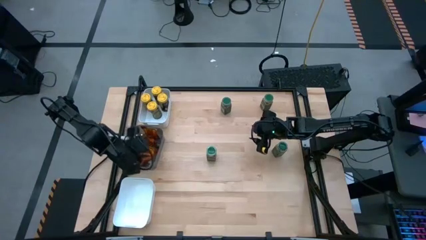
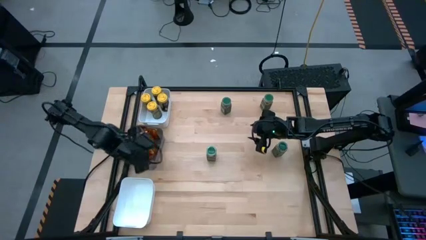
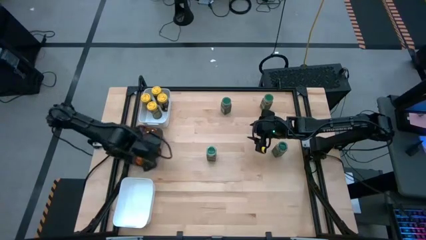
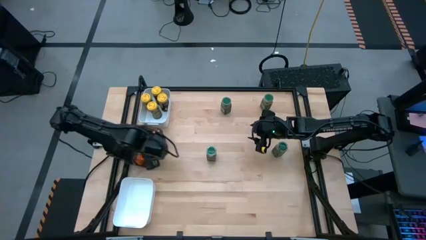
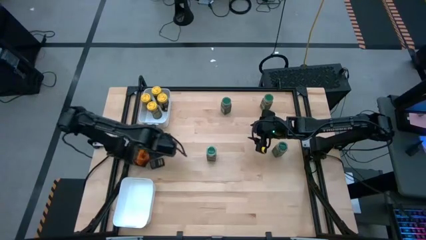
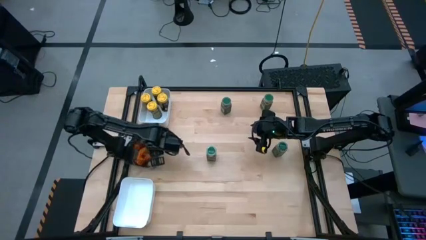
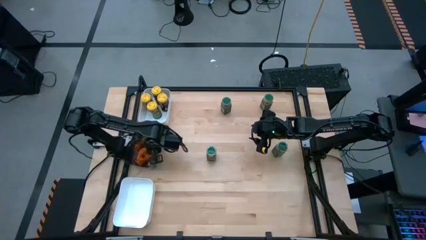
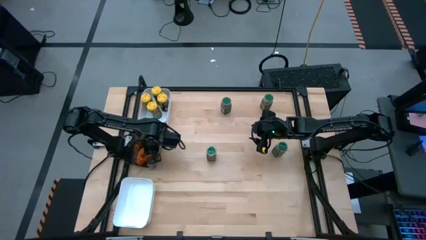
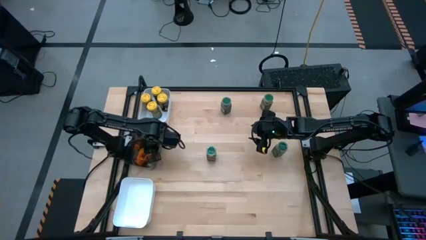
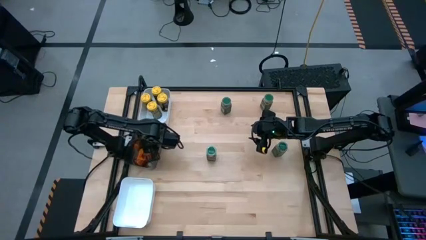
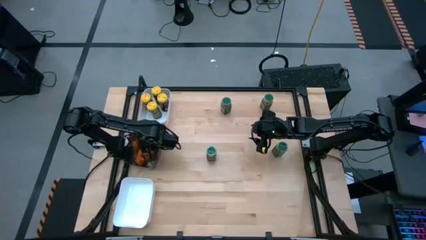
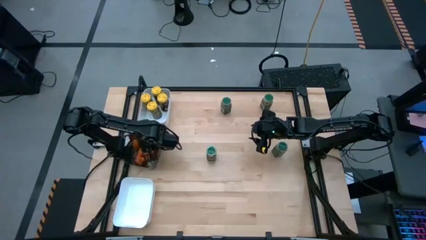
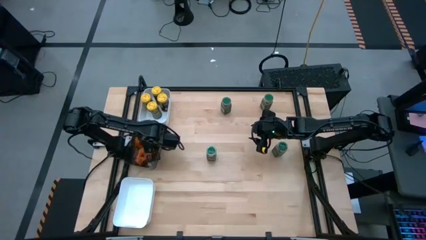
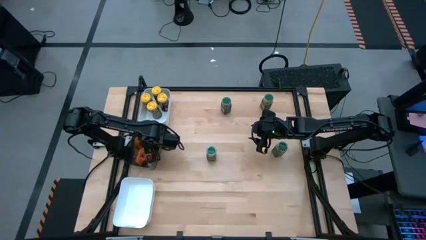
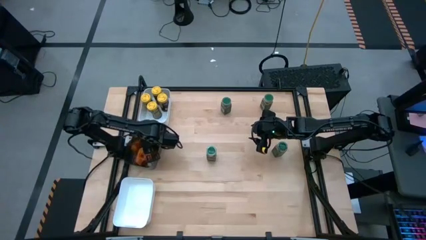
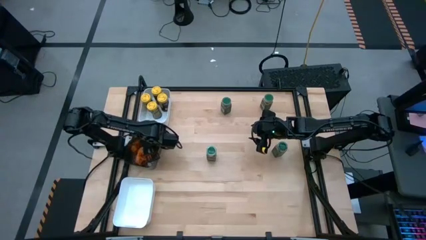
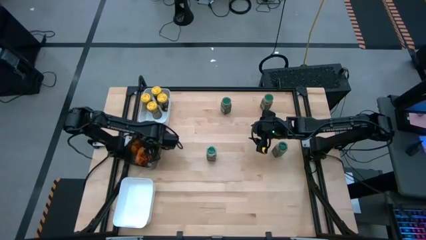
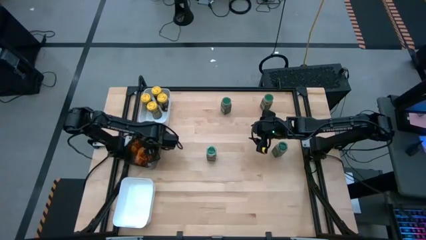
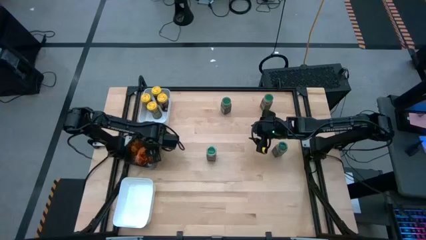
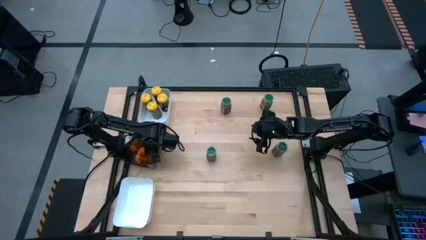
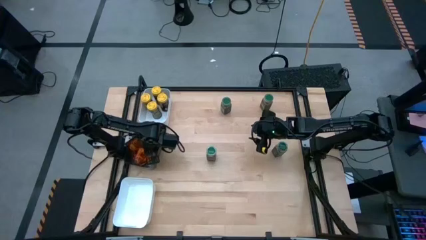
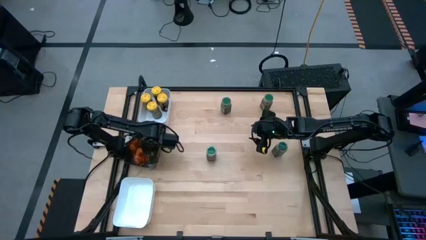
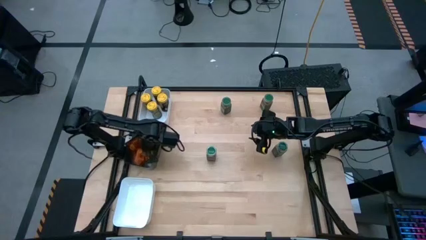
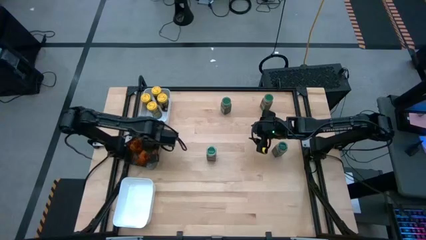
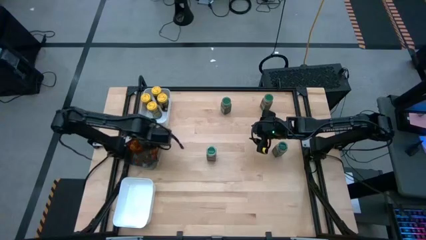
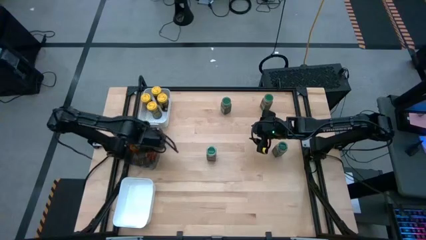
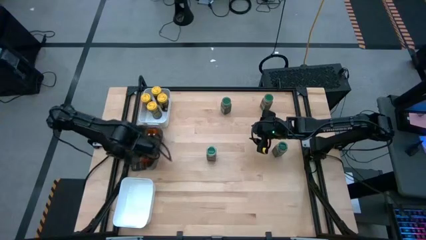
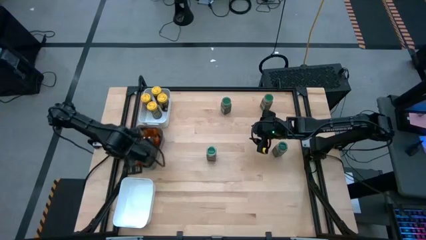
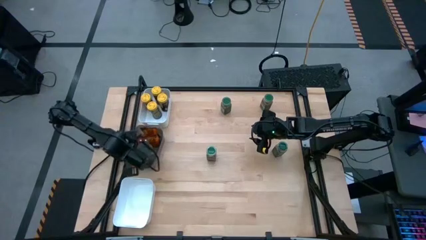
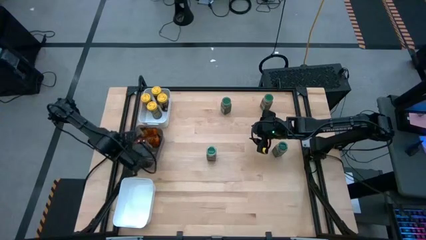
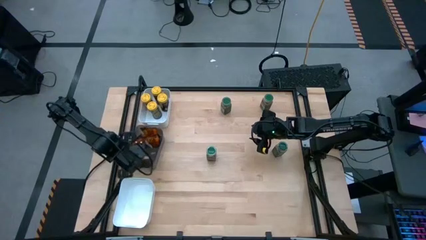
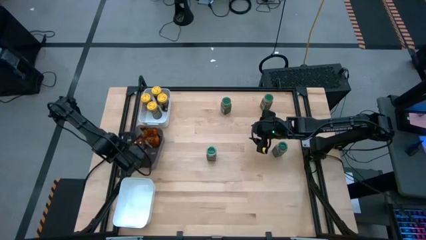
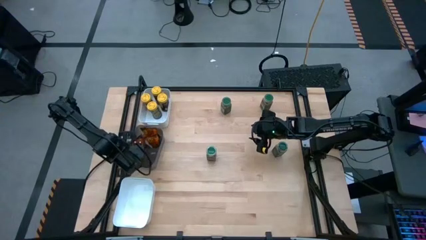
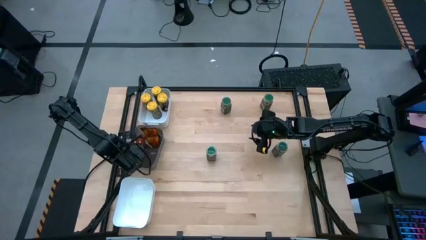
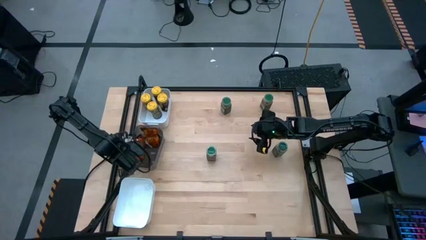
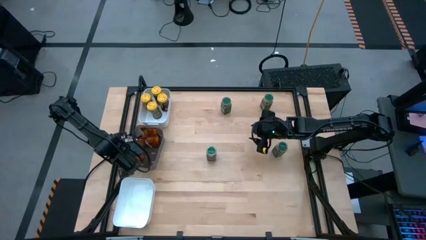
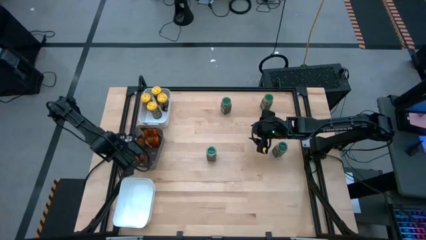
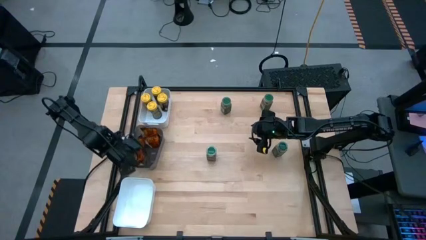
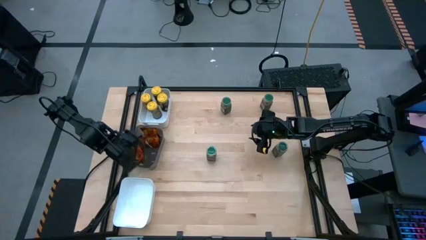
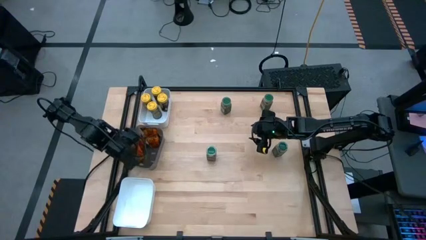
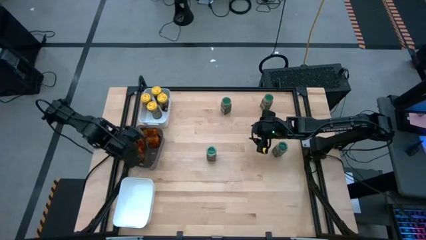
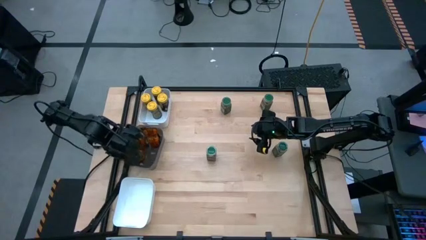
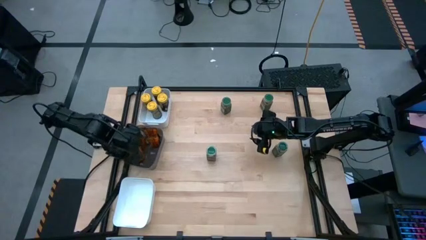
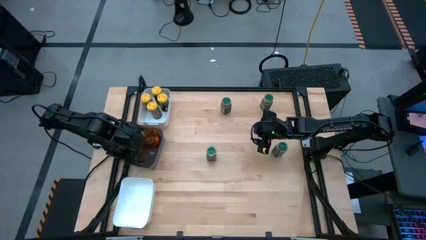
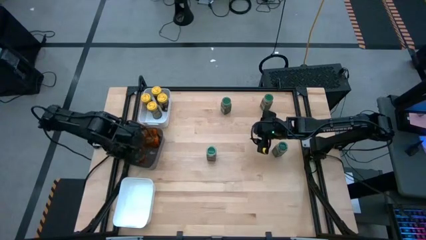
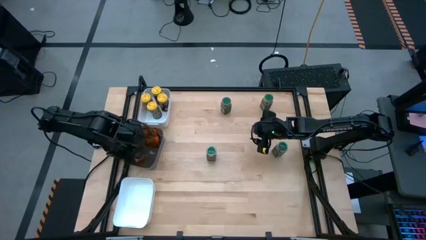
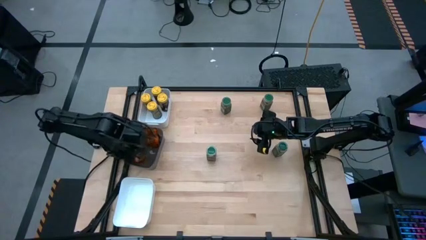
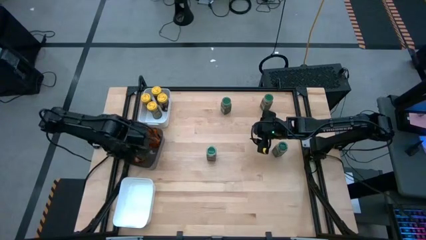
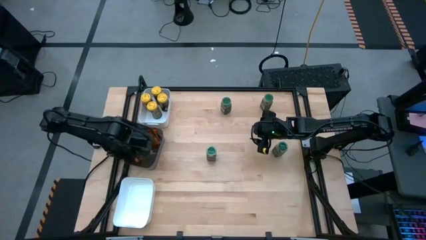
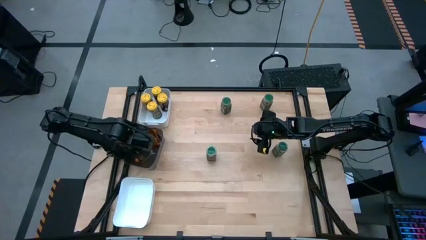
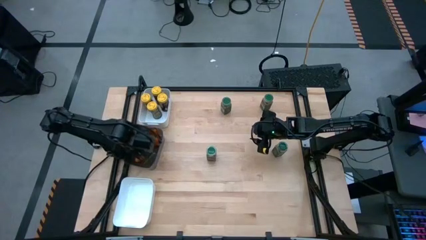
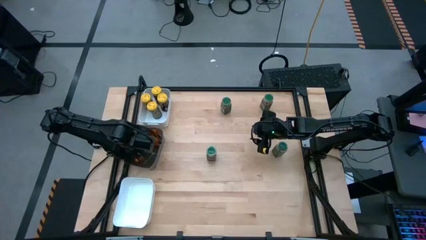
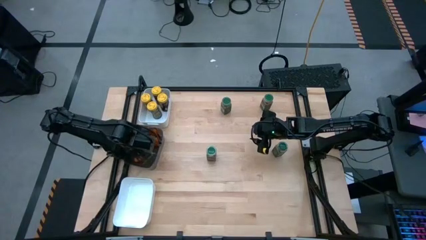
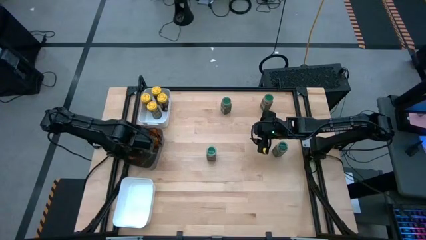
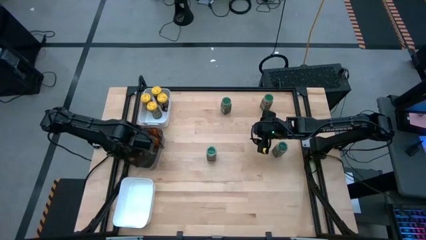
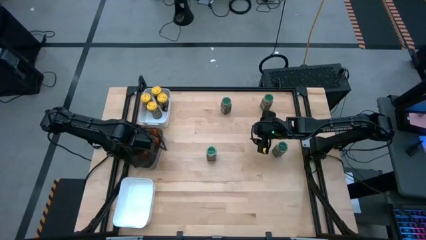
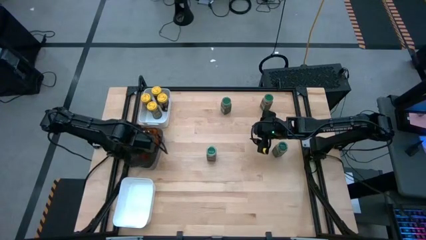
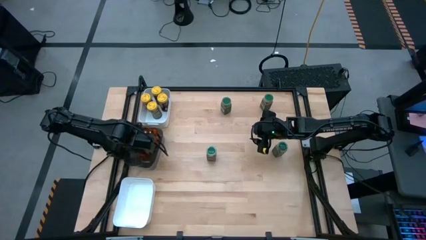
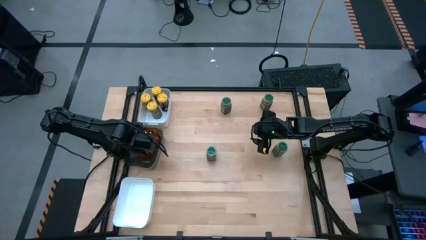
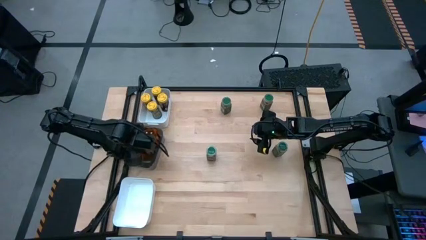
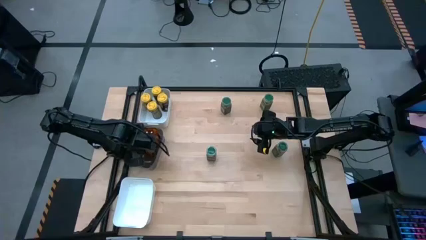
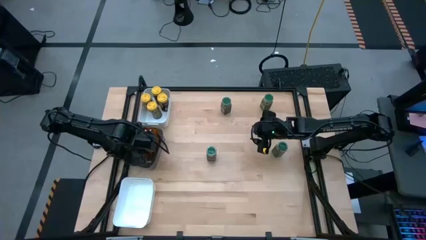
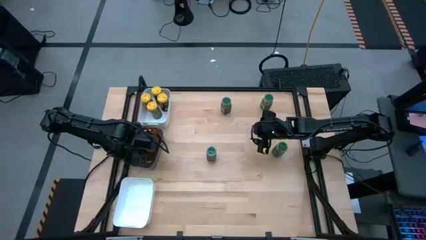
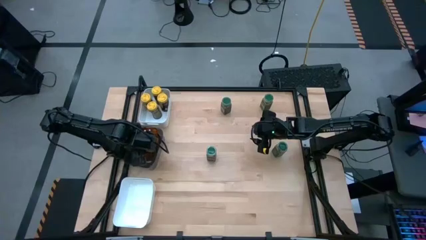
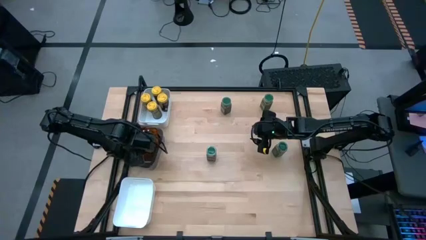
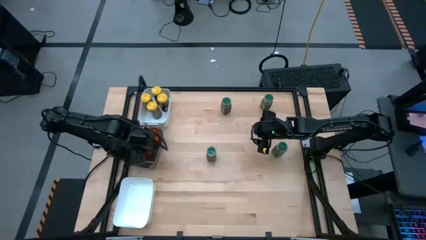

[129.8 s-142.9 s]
Task: Sort spices by type
Put the orange seasoning pack into the black bin
